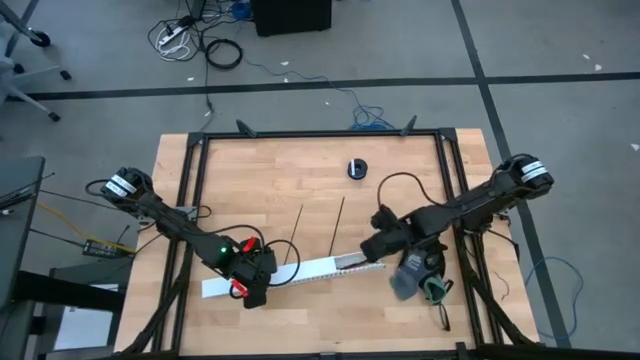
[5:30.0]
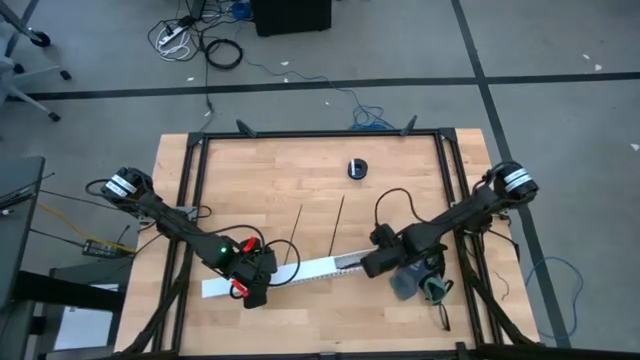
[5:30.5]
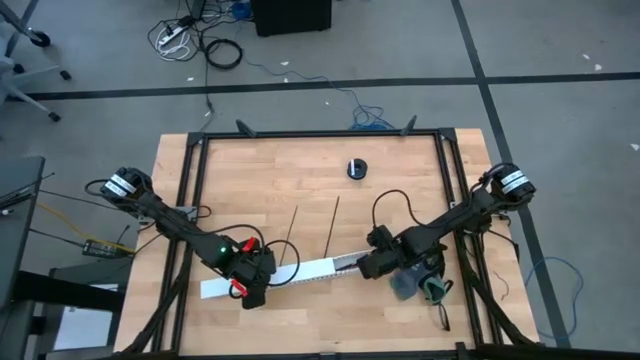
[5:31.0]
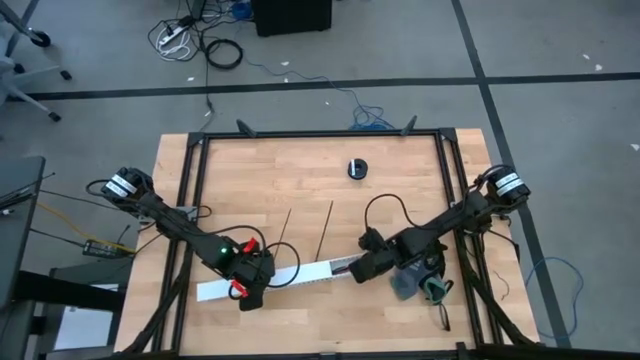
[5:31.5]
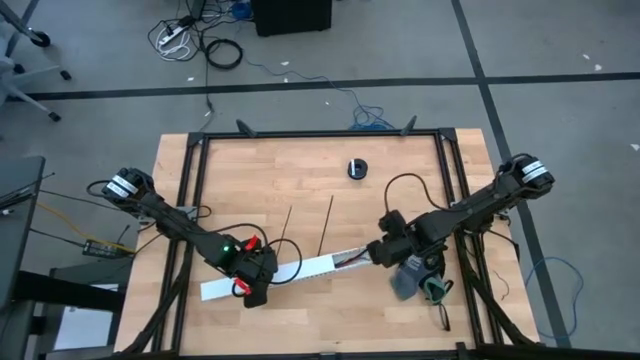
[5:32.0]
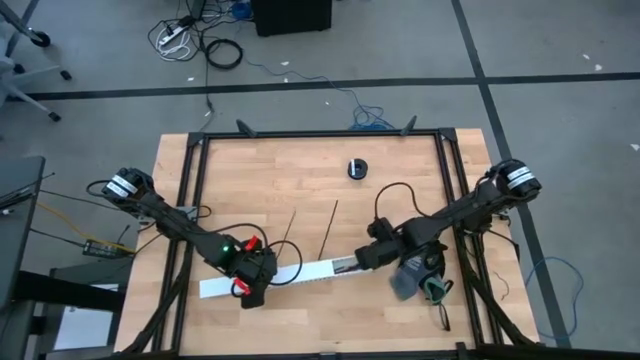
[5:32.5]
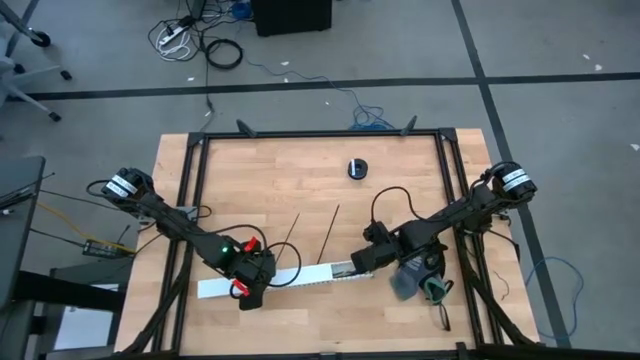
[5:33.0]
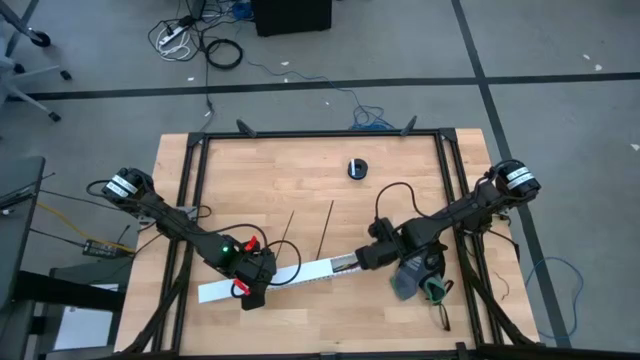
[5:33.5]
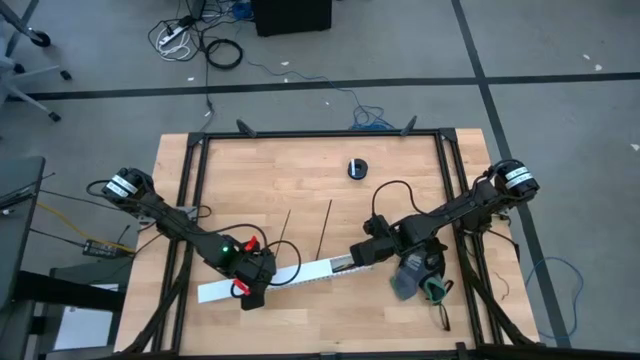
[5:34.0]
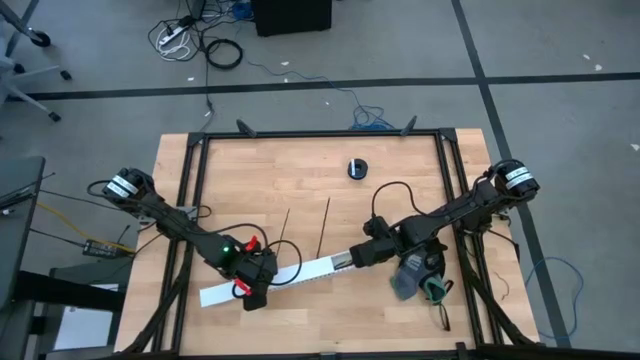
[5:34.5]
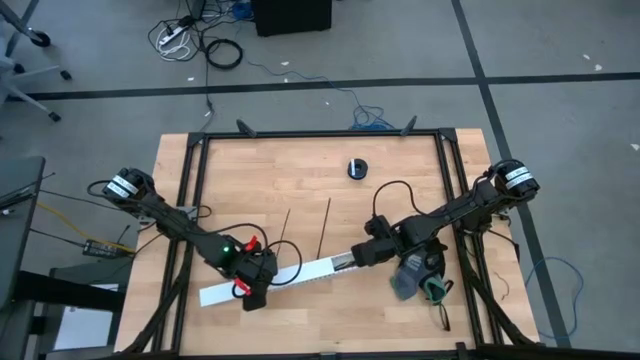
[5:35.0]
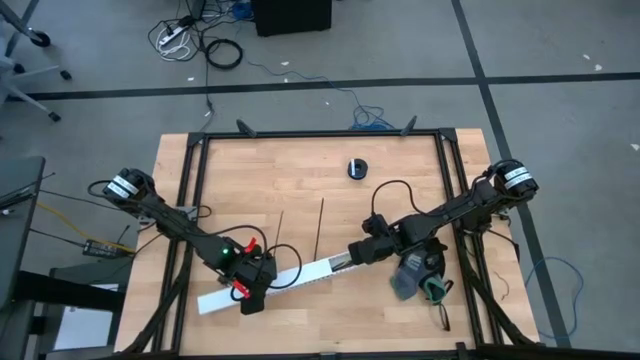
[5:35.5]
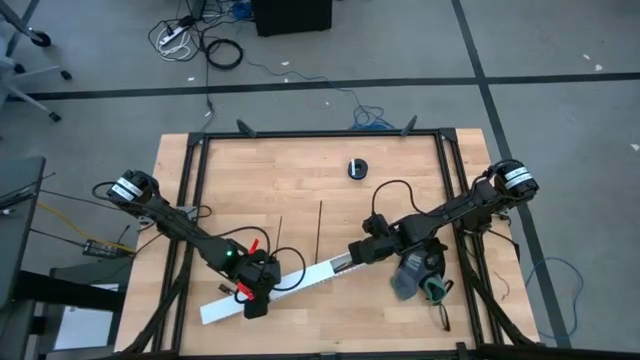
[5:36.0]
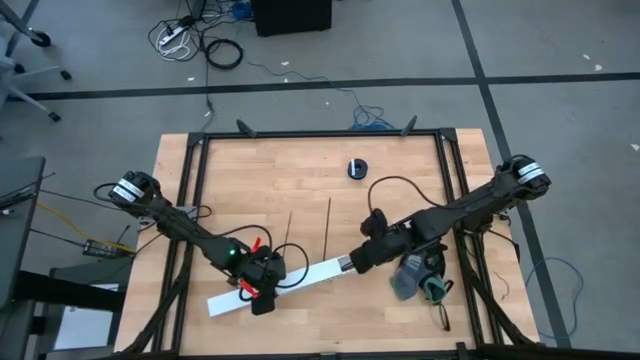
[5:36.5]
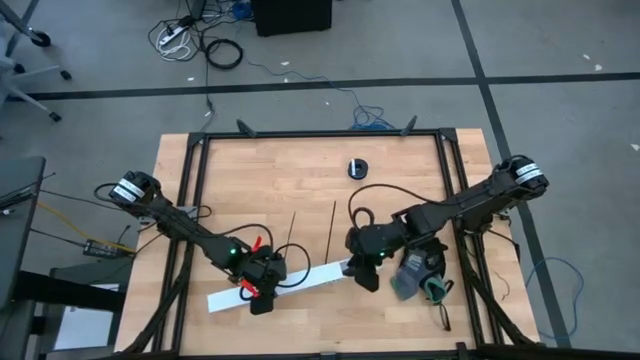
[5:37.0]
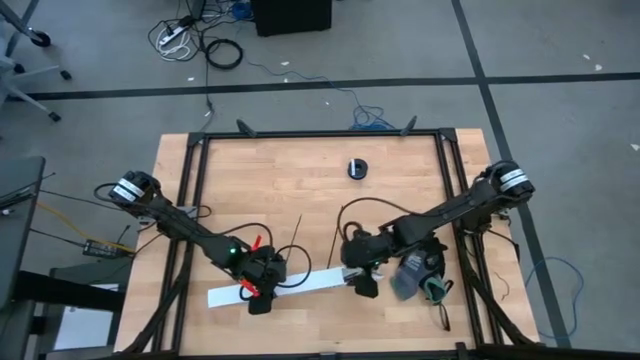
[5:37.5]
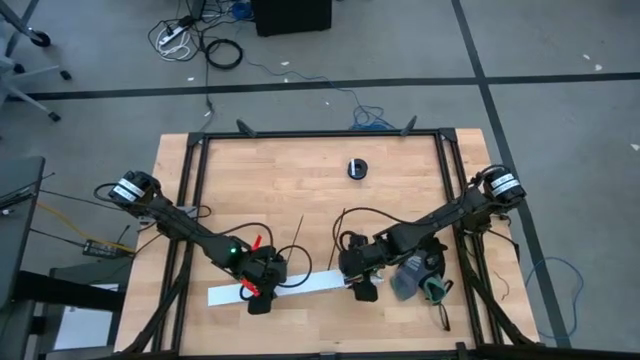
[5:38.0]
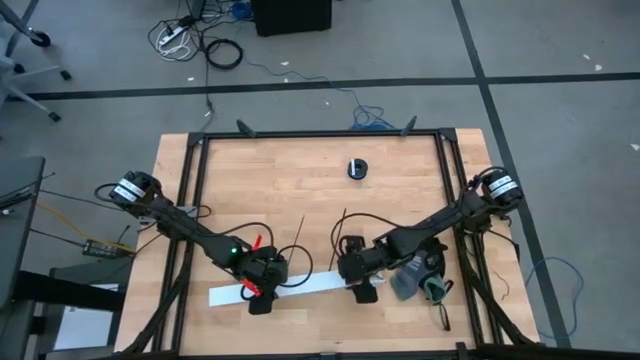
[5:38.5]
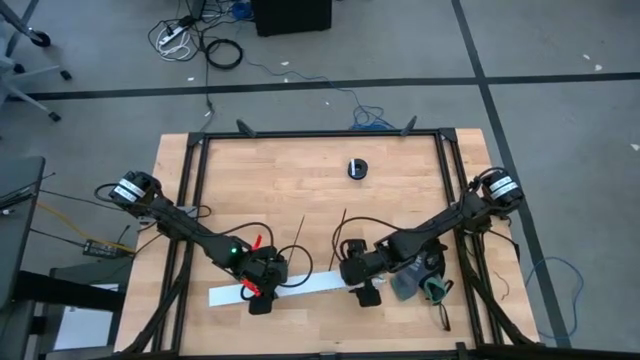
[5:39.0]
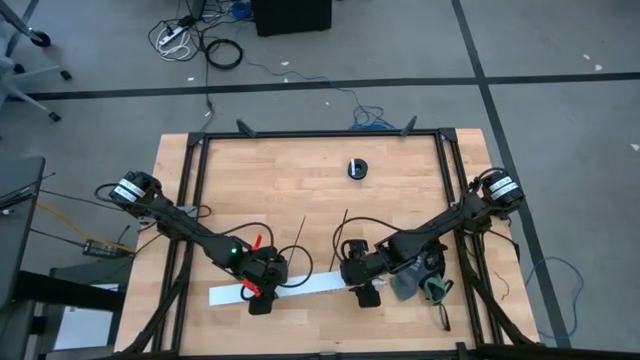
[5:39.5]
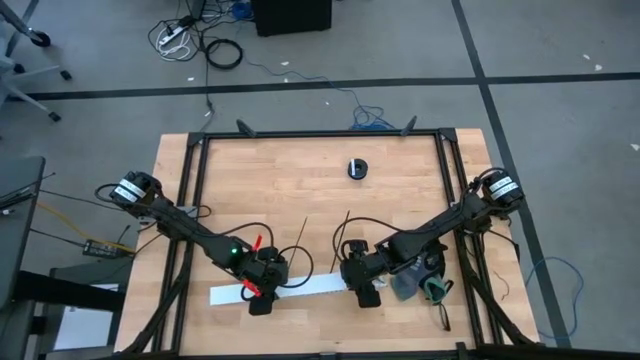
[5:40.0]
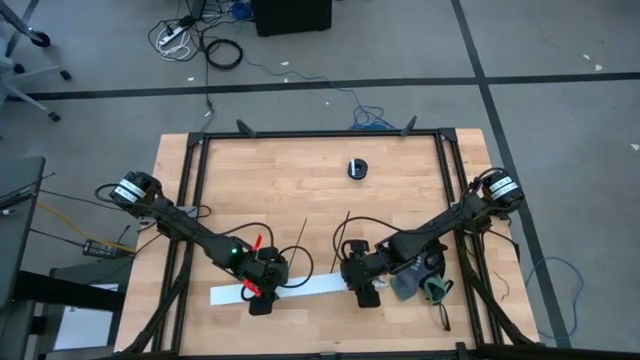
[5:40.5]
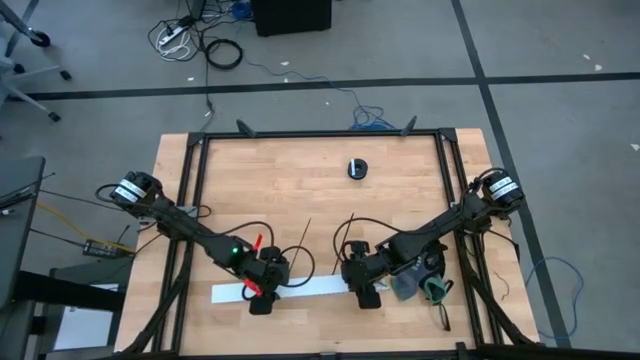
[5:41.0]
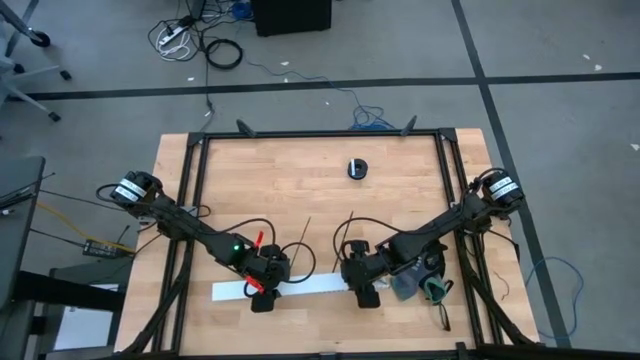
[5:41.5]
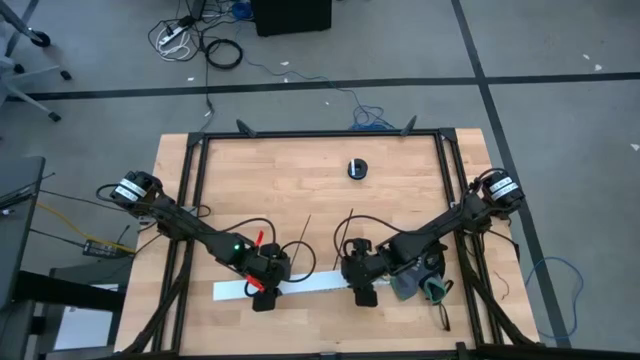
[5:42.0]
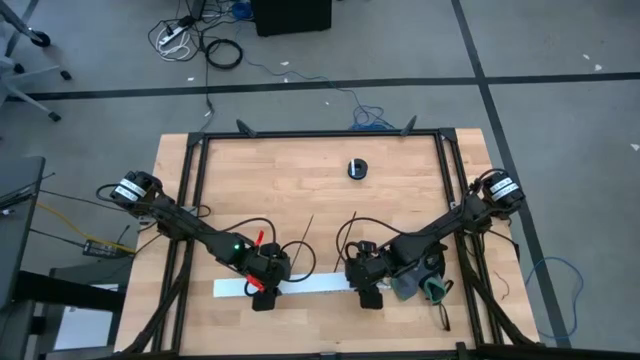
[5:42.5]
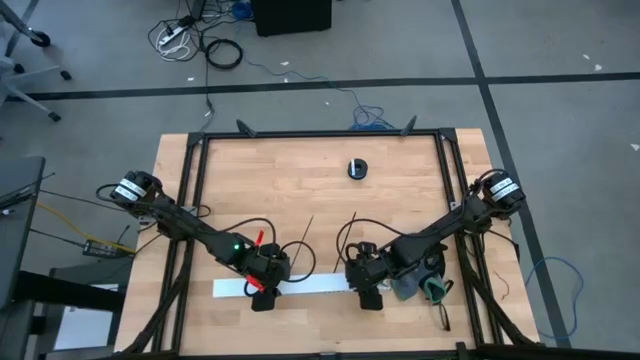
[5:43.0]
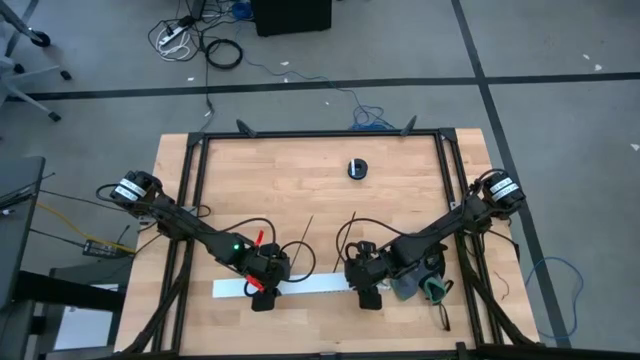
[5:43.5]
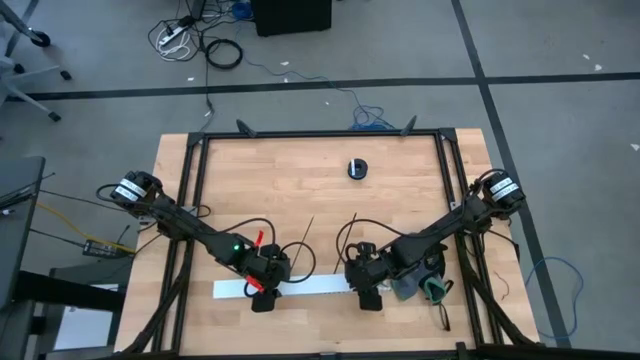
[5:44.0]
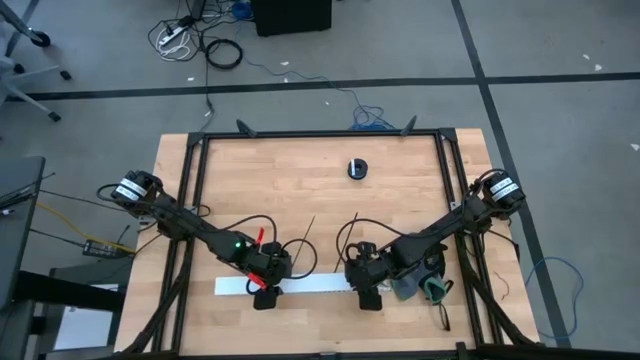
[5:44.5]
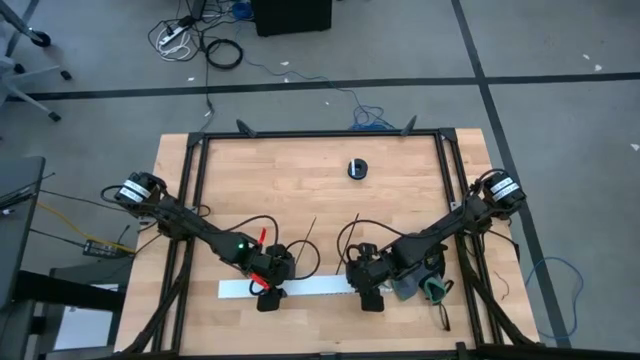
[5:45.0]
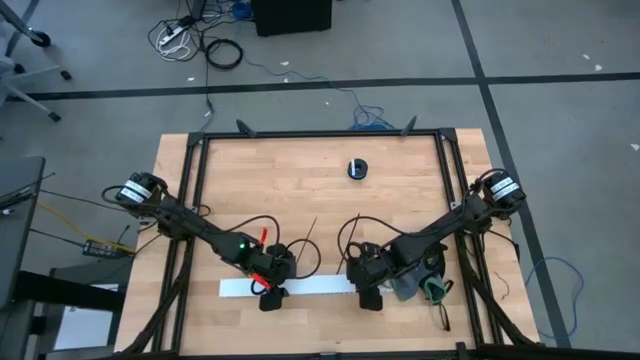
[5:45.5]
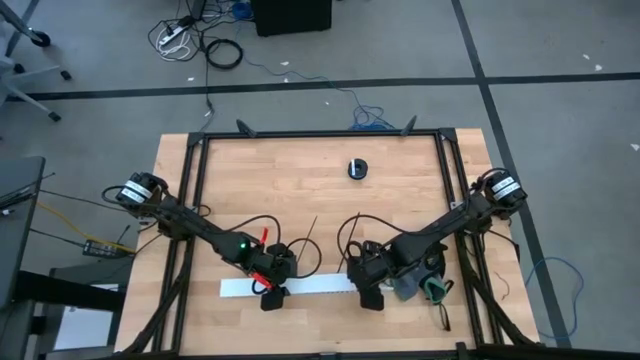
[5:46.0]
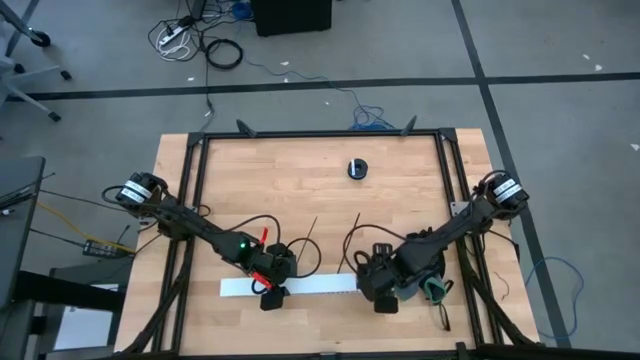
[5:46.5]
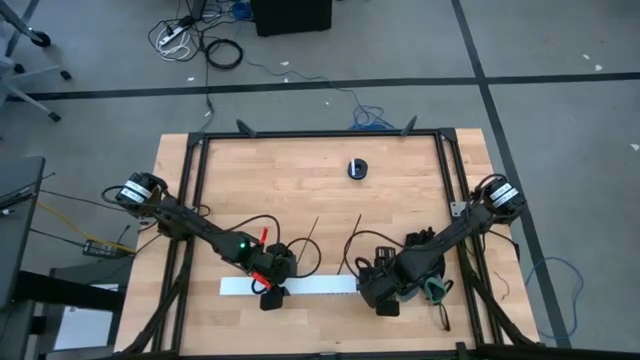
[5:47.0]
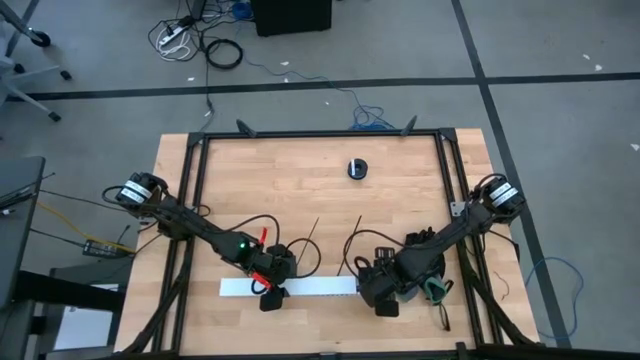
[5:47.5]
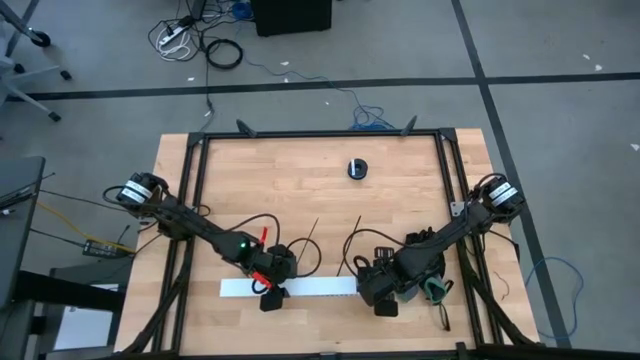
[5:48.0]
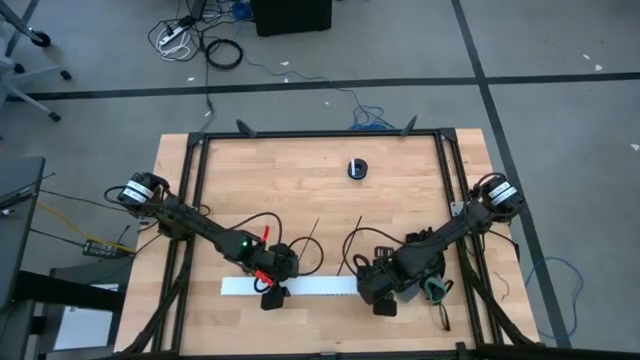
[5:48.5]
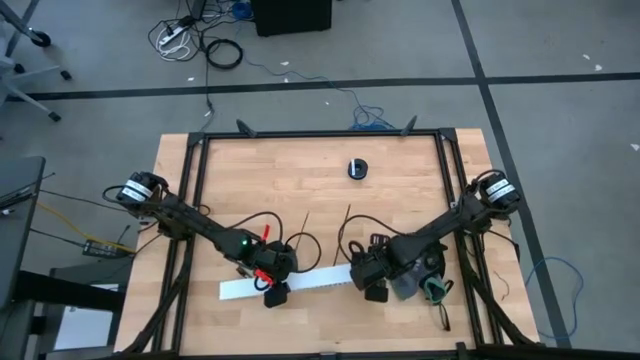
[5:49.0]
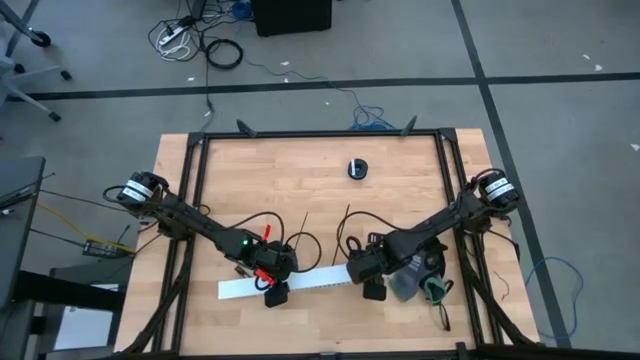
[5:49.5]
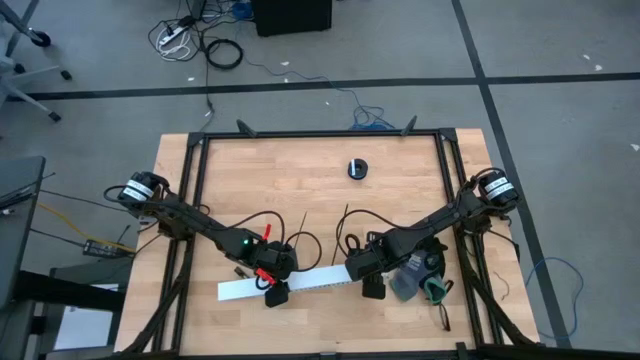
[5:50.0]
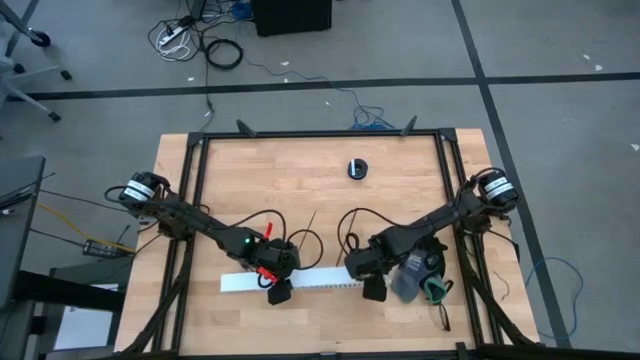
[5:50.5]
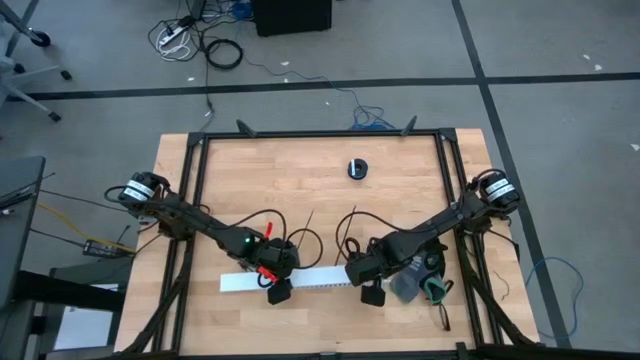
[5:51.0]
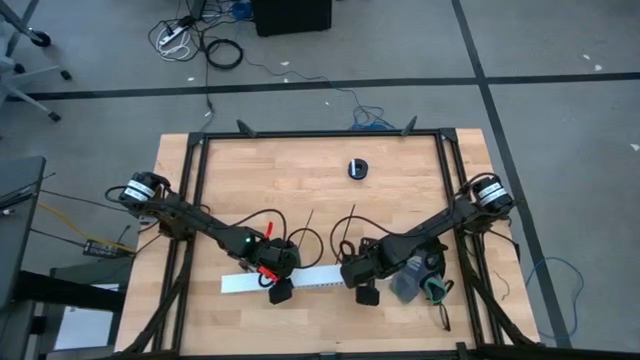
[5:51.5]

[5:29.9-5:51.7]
Task: Ziptie cables
Close the white cable duct
